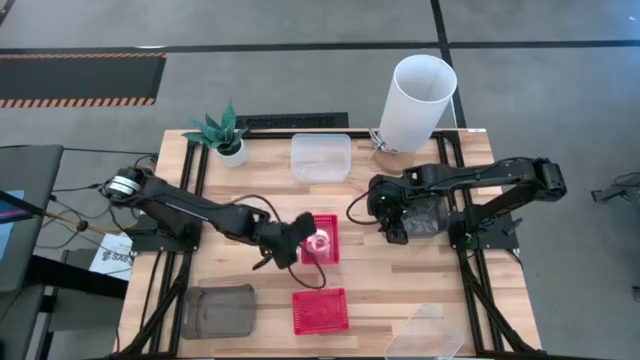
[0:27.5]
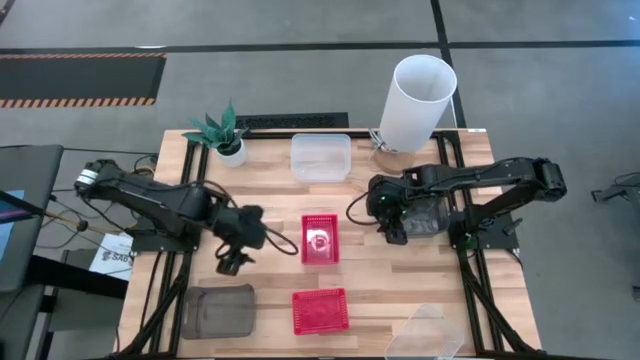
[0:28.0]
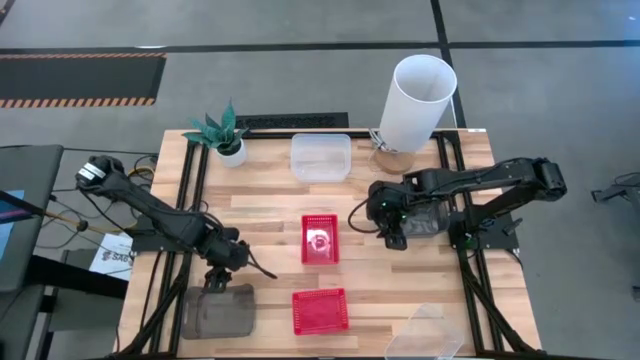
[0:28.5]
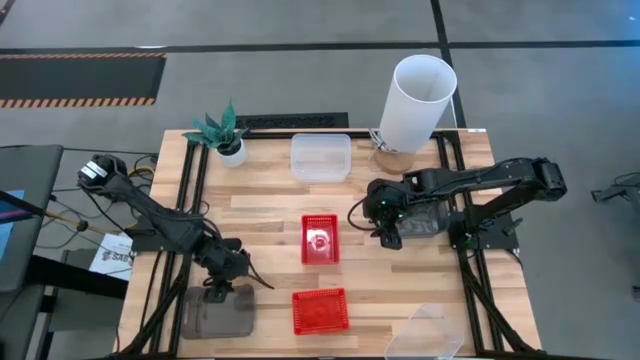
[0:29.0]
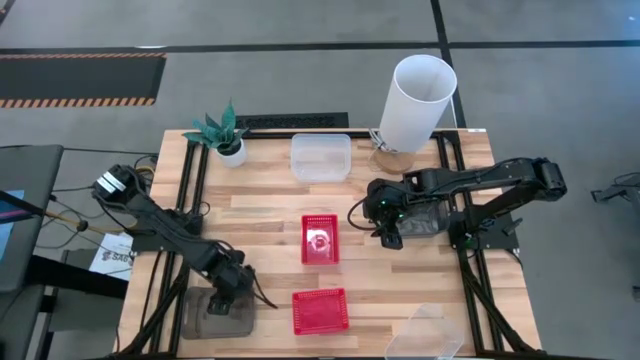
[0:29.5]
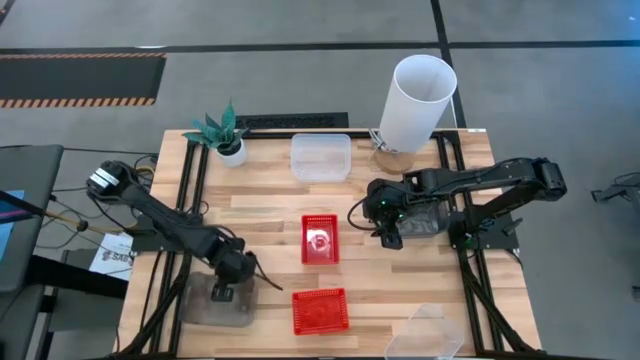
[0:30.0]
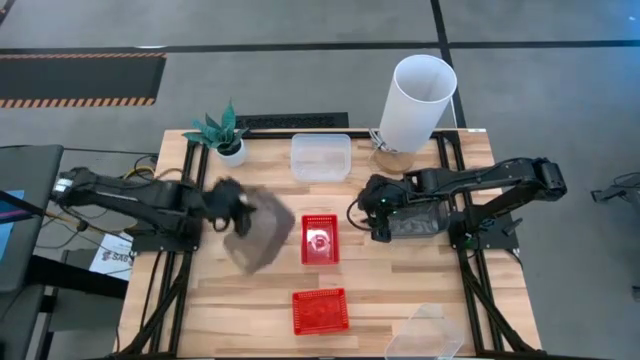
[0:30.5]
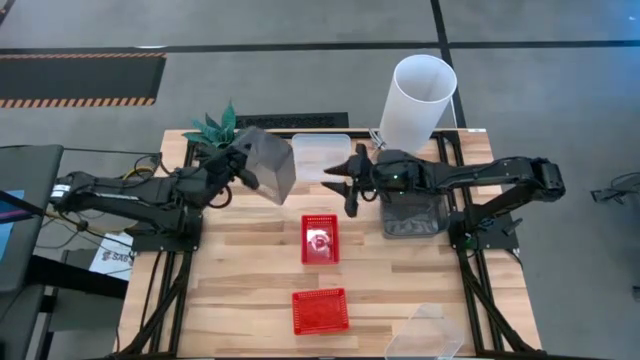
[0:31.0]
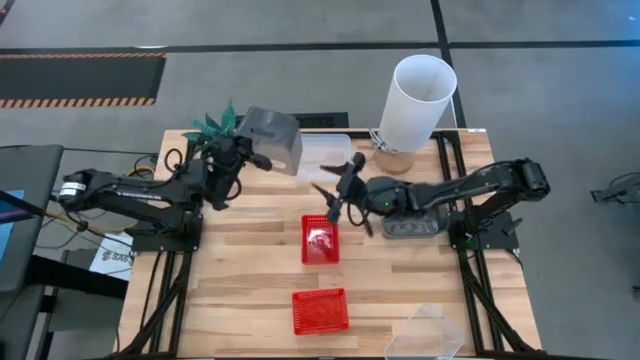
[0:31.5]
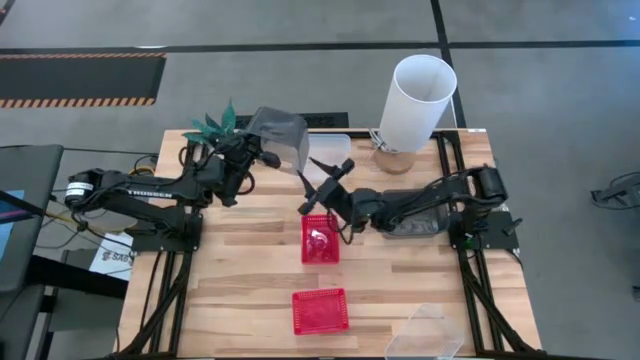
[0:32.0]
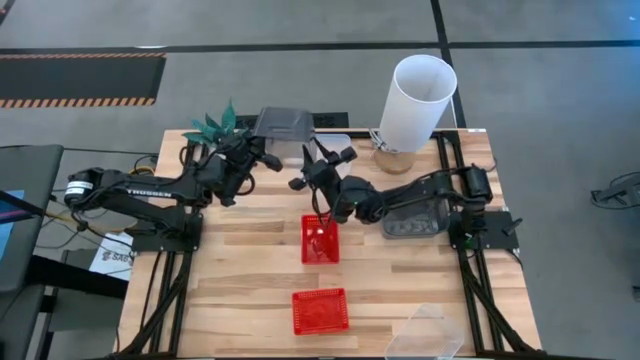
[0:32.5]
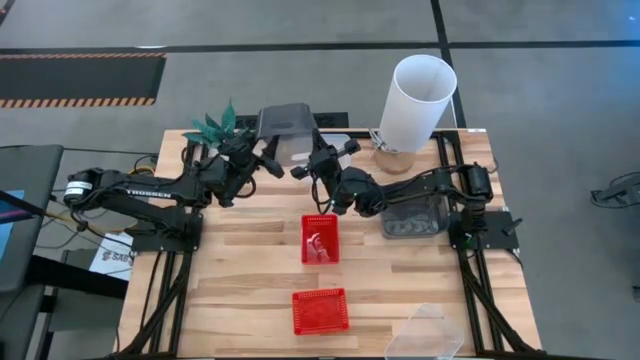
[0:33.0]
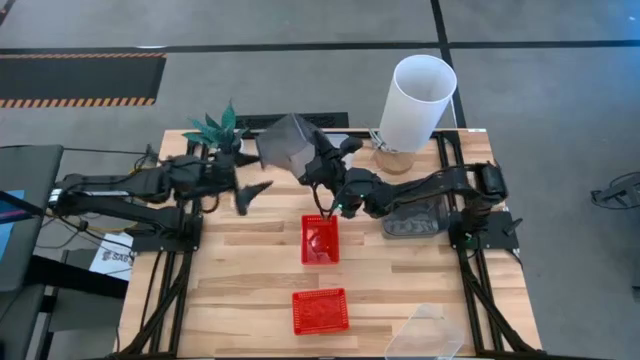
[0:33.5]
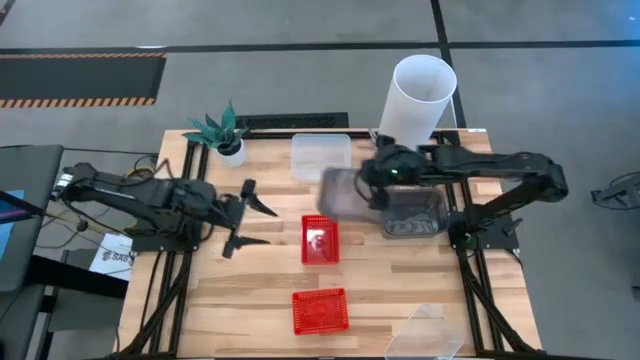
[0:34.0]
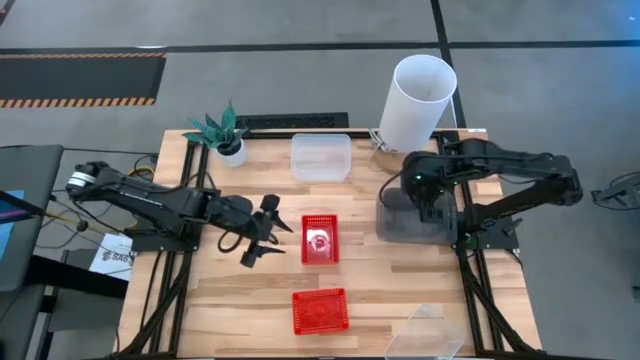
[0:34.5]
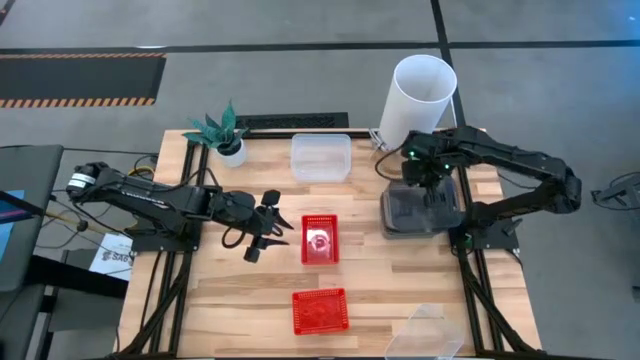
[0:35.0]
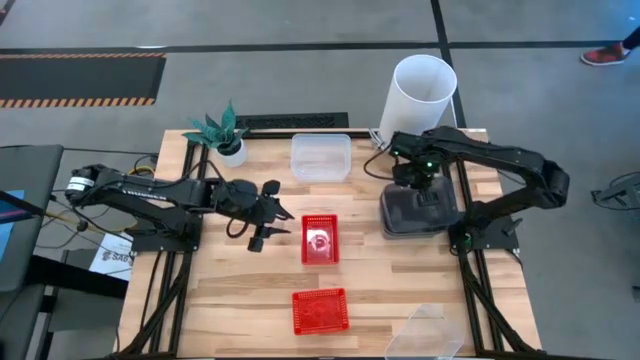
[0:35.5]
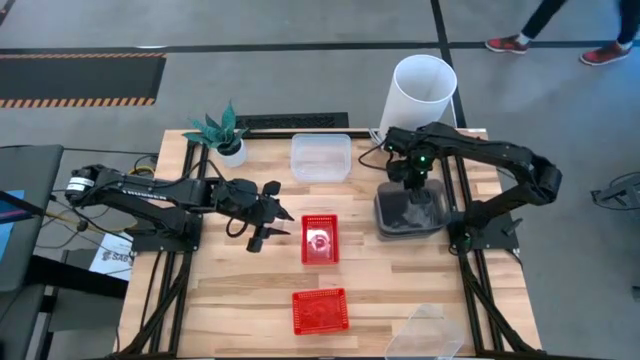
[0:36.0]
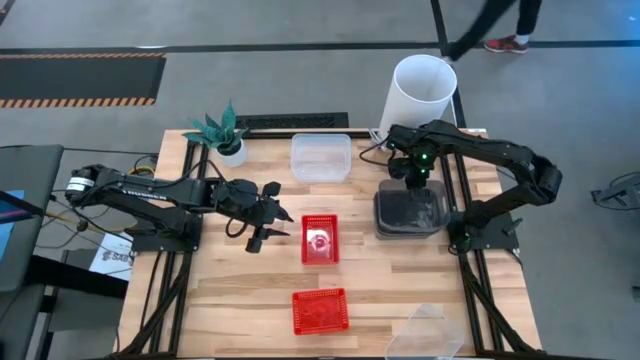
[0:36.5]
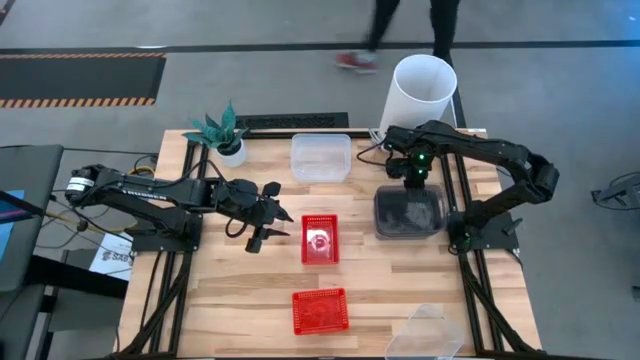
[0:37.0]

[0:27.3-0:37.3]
Stack the left gray bin on top of the right gray stacked bins

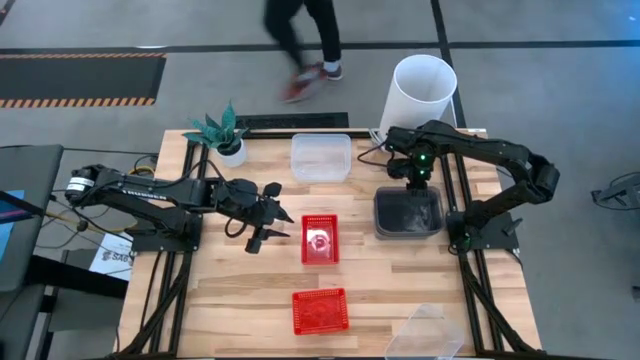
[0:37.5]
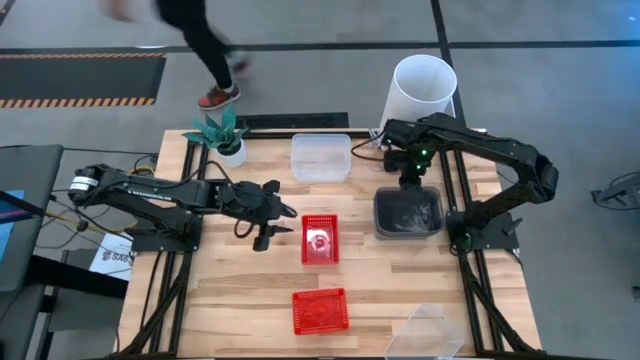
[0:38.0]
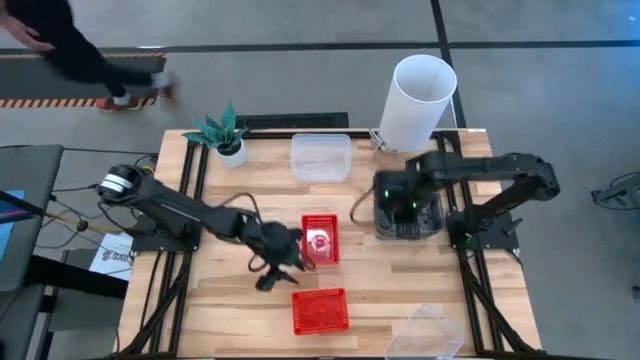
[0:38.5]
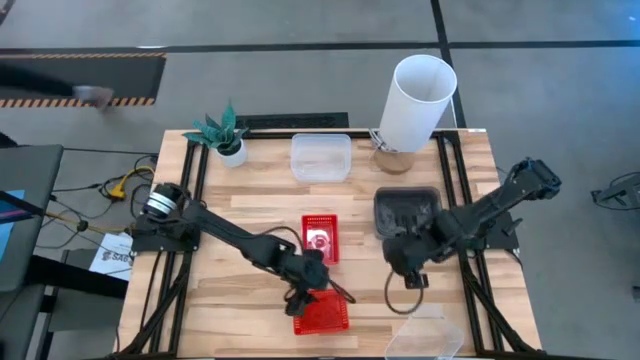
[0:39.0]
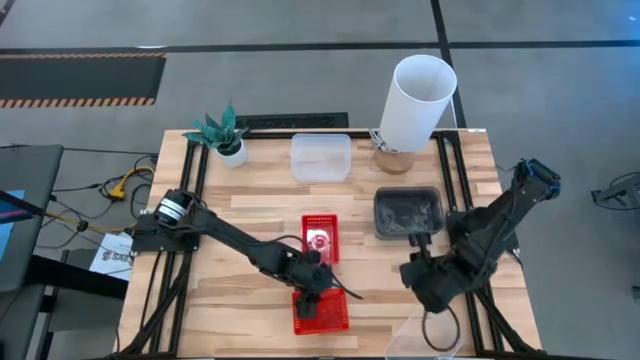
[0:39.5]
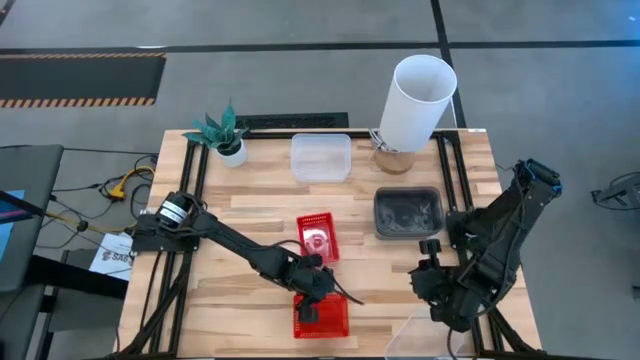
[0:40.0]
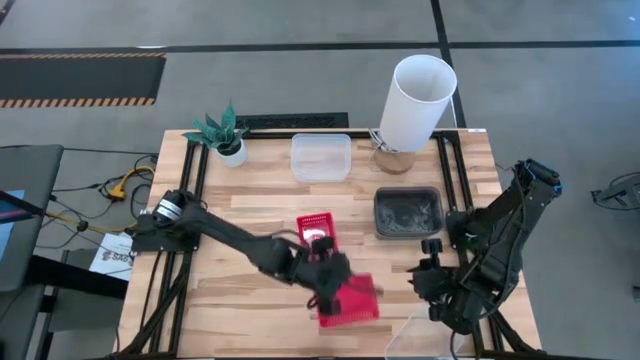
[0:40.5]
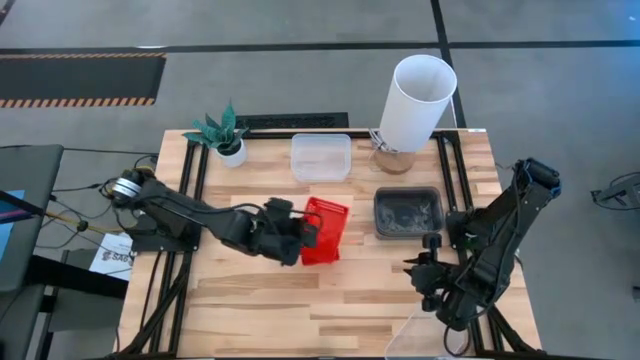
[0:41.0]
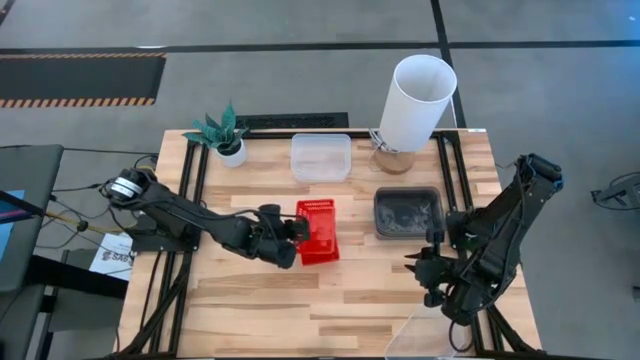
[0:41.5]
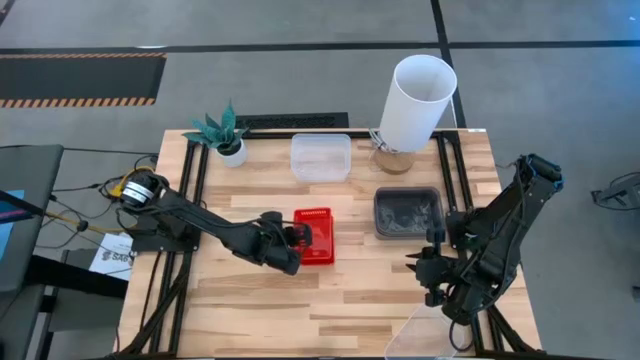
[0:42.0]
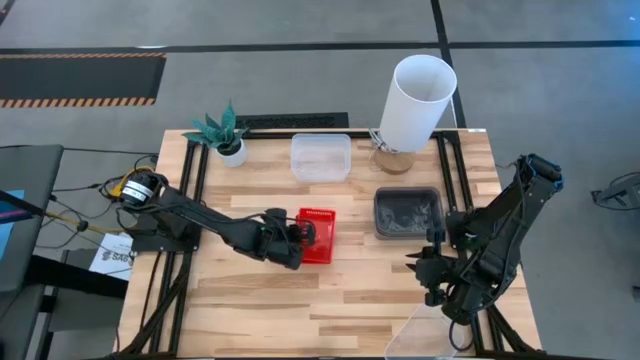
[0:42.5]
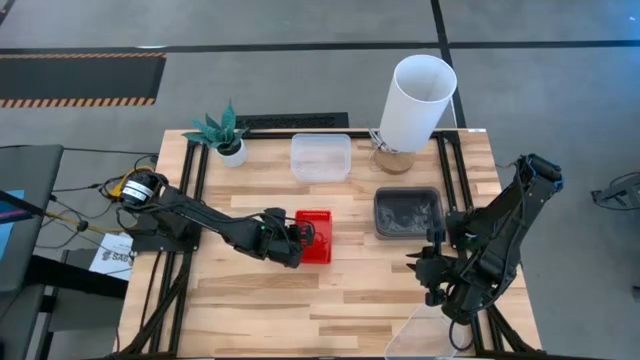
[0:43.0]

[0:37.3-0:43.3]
Stack the bottom red bin on top of the top red stacked bins
